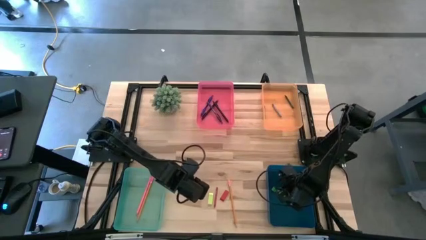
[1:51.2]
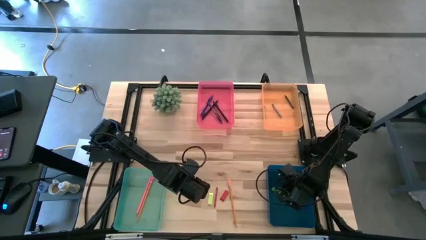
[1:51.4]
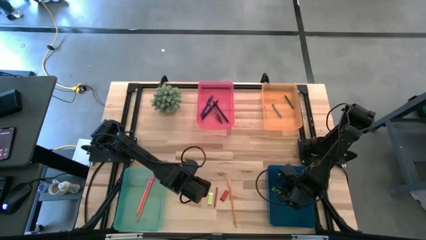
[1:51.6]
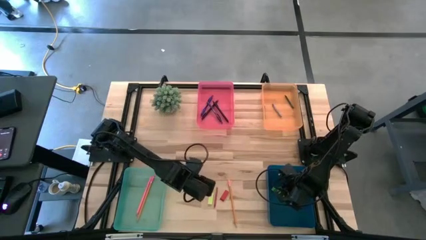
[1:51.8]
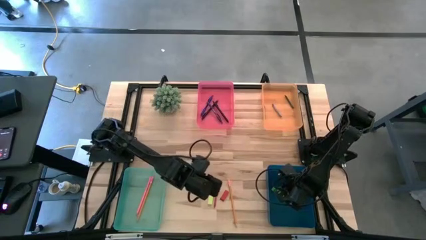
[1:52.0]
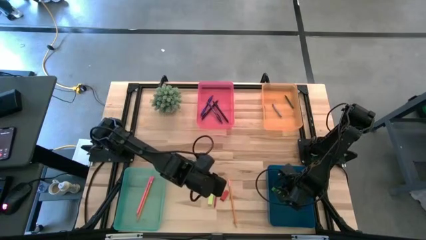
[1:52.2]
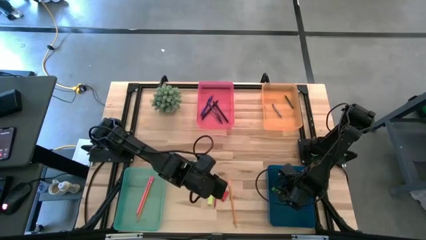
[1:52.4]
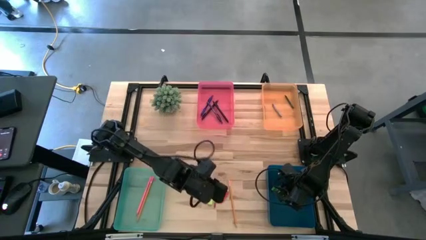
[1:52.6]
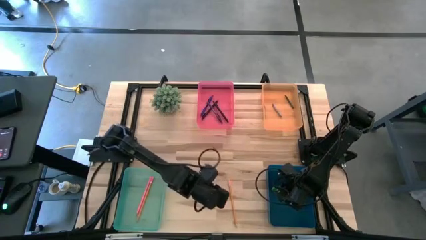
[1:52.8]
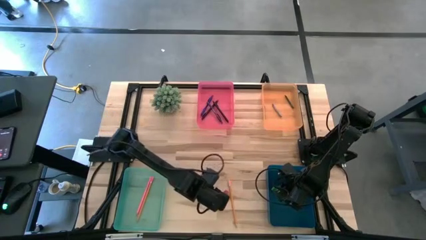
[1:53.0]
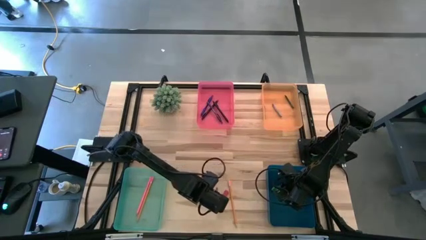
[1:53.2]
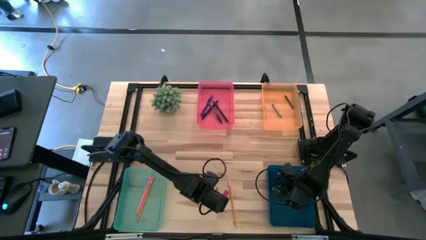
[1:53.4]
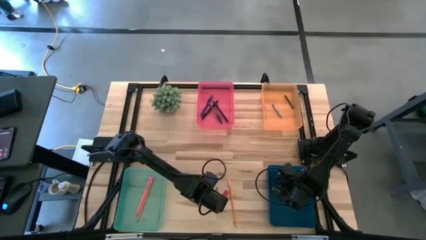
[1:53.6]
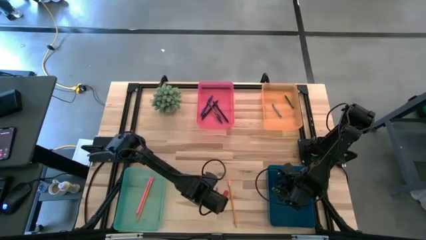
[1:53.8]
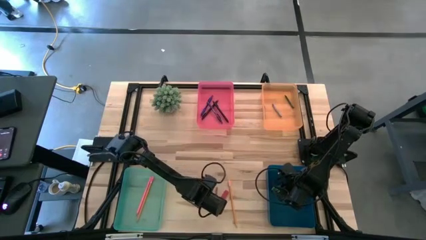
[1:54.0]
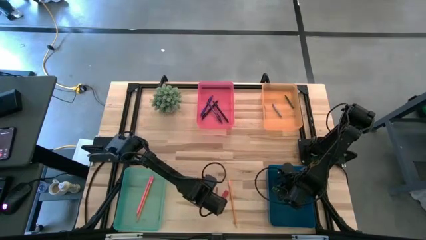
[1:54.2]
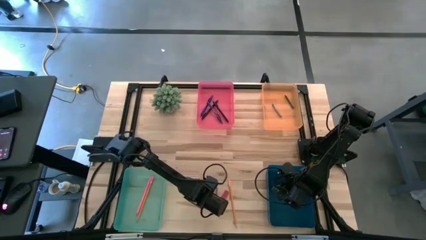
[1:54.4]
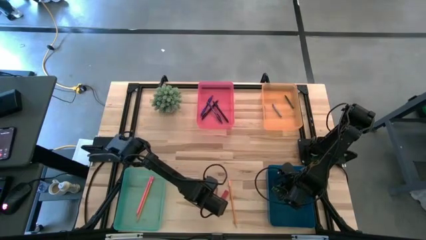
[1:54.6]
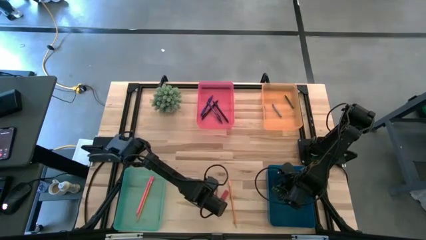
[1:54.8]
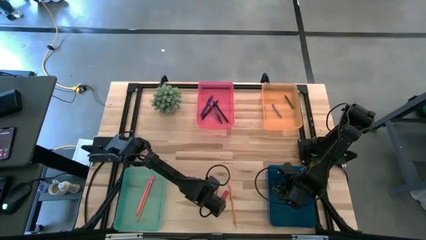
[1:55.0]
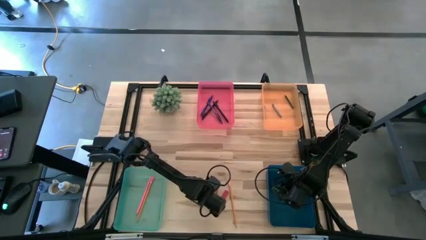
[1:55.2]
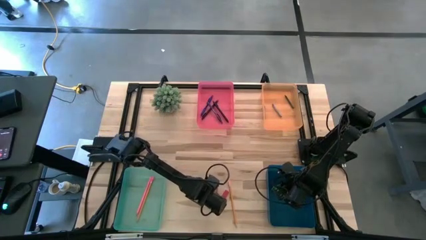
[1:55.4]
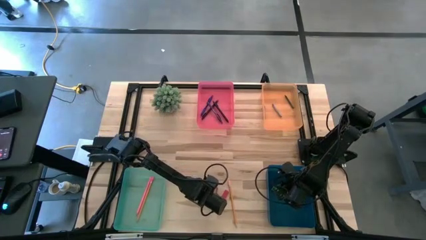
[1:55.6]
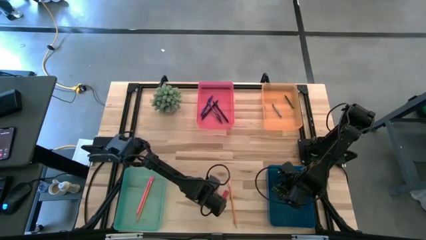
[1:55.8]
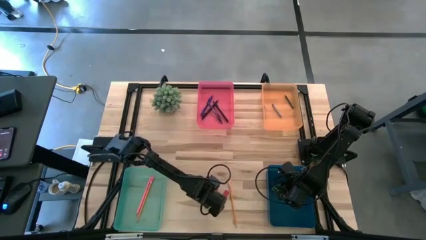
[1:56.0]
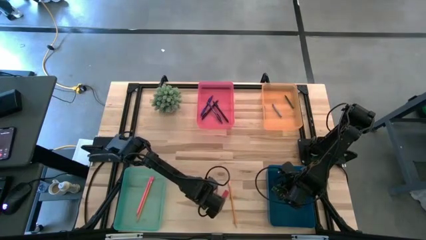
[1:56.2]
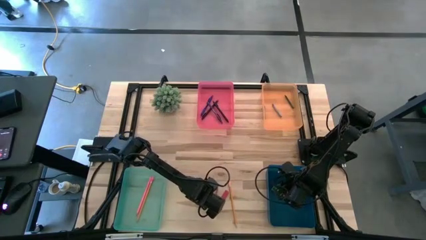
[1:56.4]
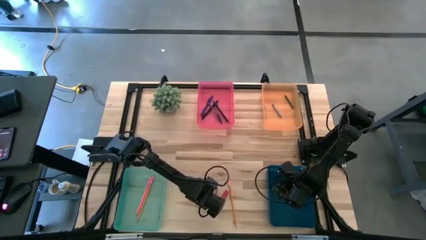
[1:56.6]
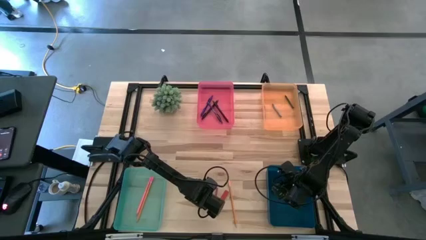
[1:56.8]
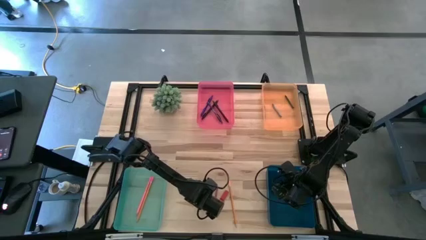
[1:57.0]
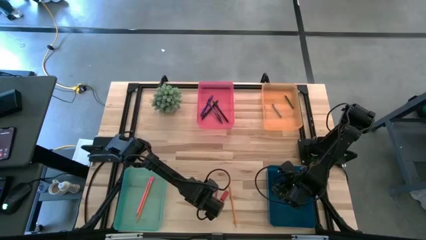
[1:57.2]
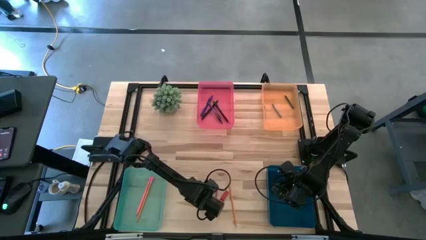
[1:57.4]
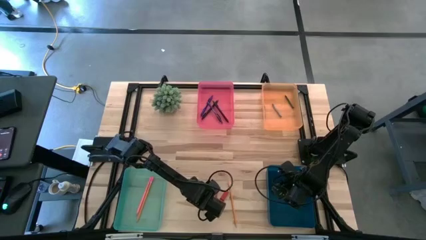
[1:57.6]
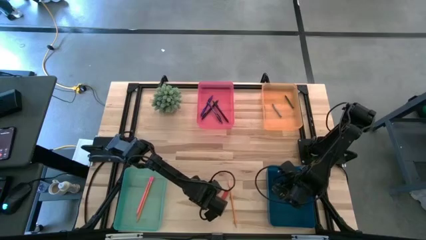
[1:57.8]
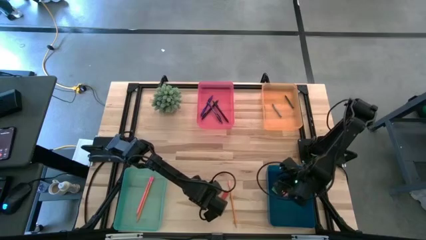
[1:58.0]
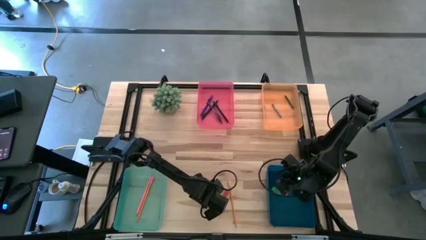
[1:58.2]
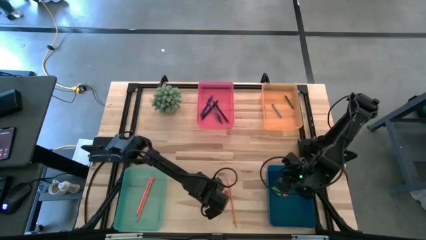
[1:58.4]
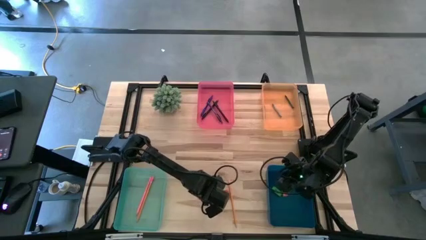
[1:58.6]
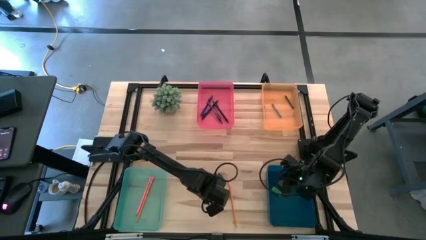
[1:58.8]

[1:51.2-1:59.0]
Task: Sort crayons/erasers/pens/pencils in bins
Put the light green eraser into the blue bin

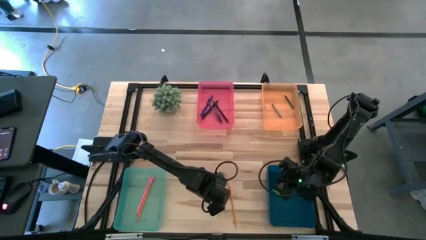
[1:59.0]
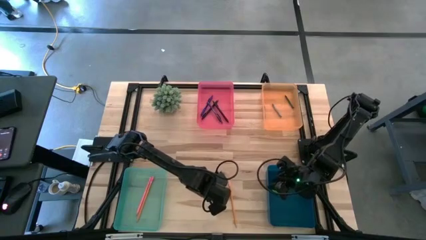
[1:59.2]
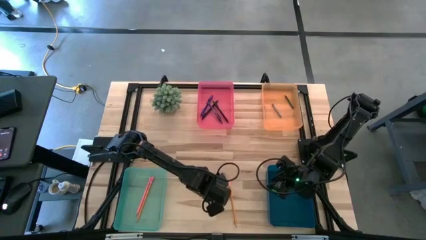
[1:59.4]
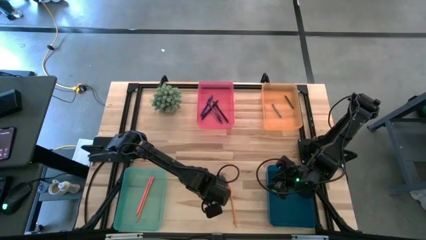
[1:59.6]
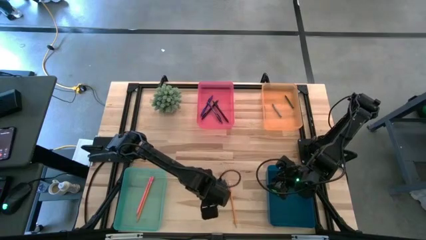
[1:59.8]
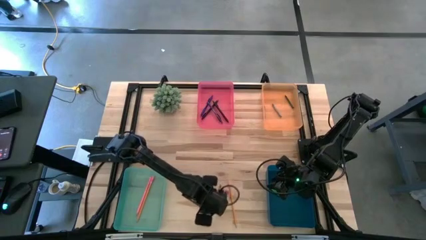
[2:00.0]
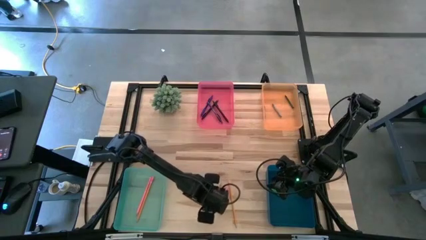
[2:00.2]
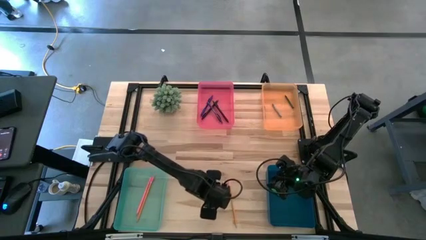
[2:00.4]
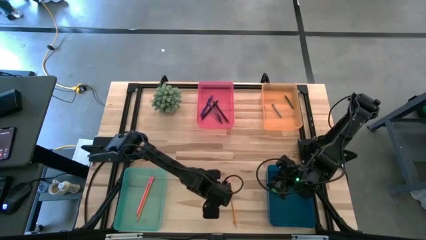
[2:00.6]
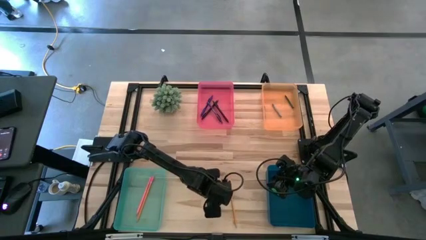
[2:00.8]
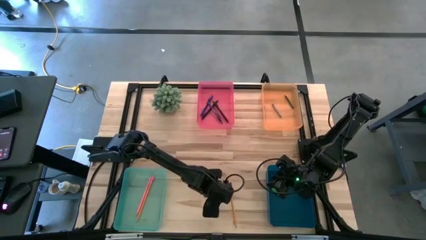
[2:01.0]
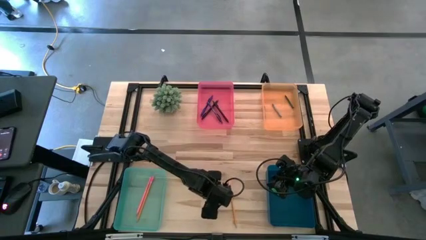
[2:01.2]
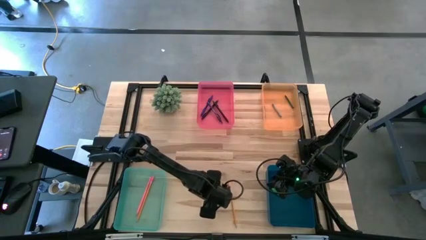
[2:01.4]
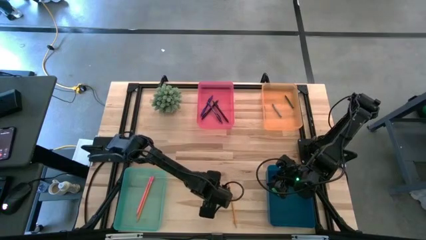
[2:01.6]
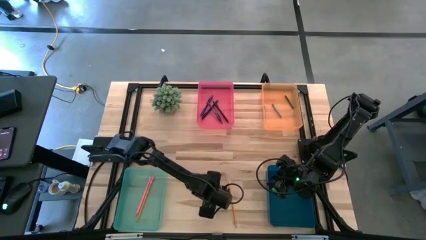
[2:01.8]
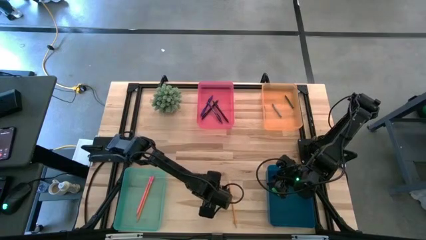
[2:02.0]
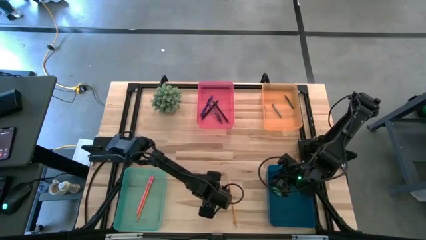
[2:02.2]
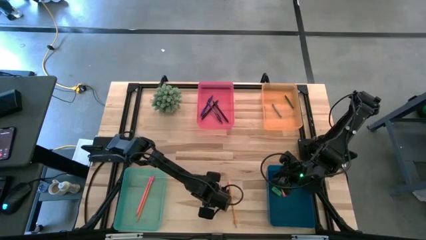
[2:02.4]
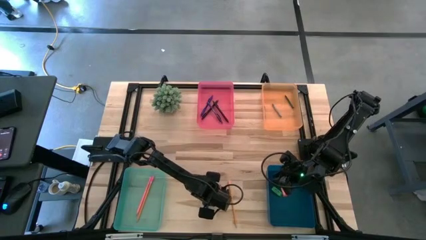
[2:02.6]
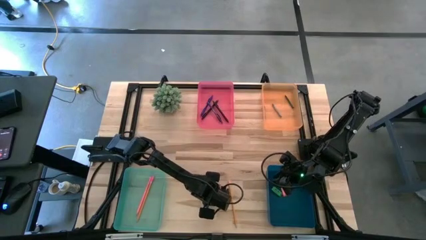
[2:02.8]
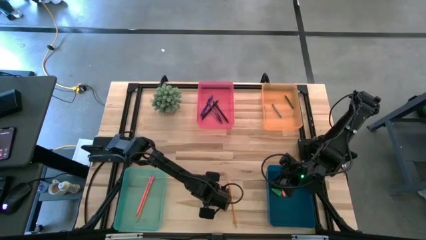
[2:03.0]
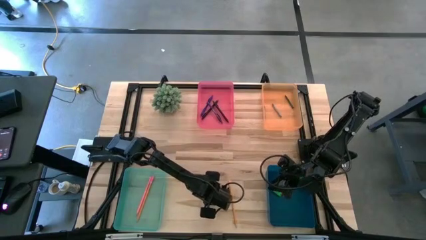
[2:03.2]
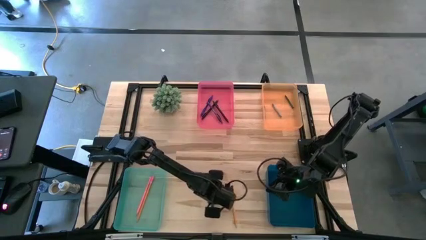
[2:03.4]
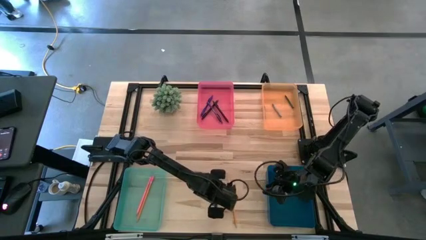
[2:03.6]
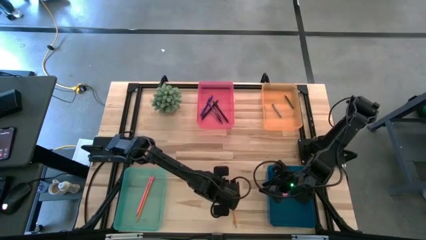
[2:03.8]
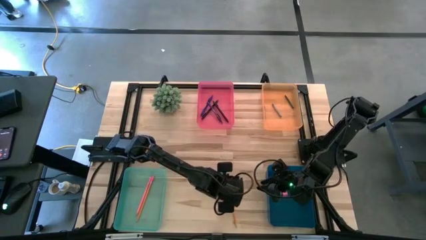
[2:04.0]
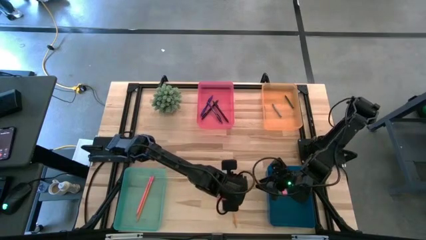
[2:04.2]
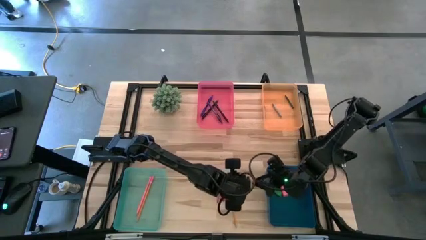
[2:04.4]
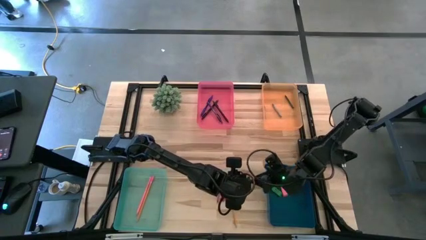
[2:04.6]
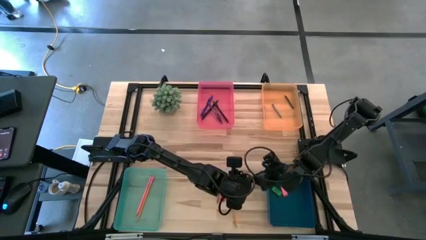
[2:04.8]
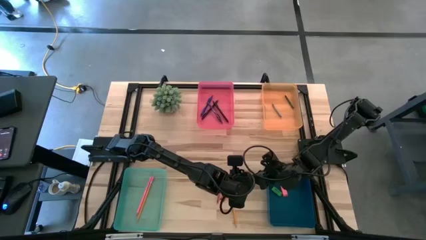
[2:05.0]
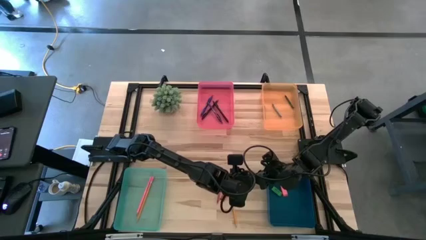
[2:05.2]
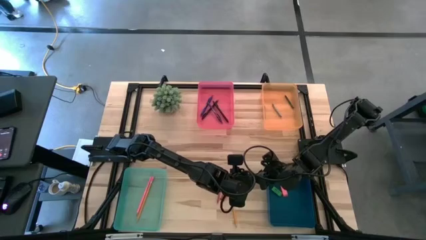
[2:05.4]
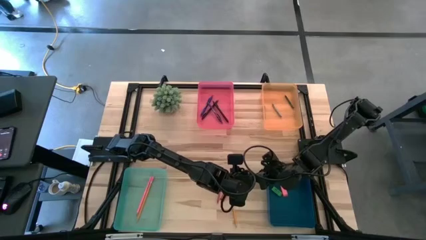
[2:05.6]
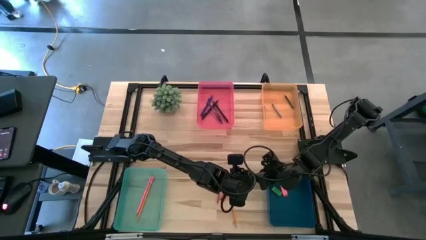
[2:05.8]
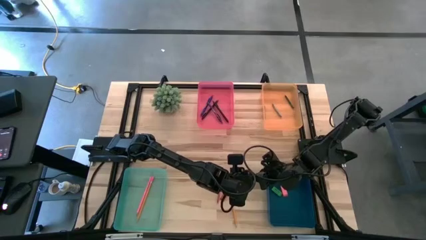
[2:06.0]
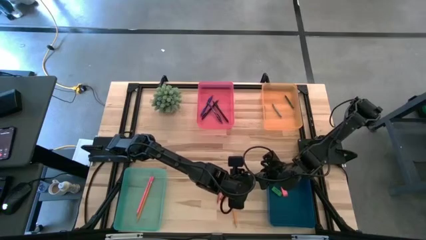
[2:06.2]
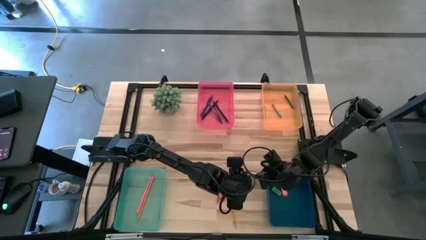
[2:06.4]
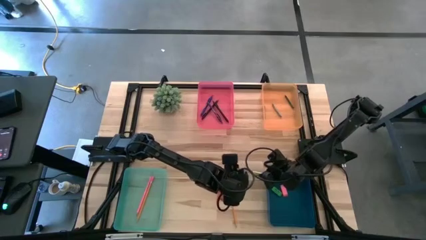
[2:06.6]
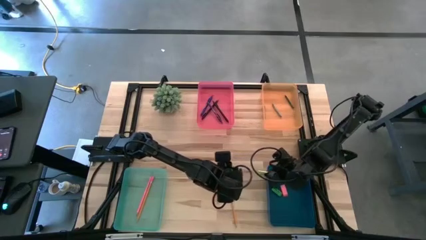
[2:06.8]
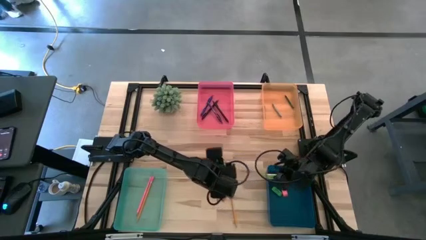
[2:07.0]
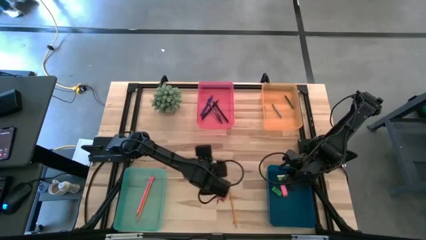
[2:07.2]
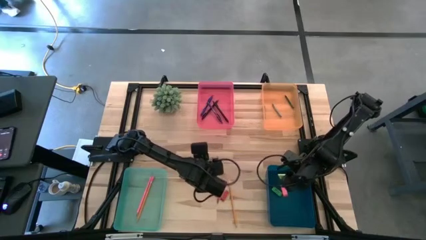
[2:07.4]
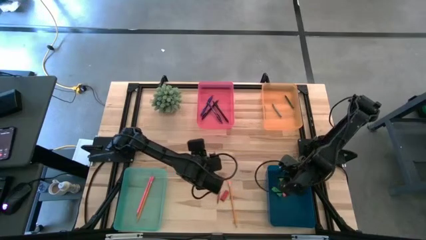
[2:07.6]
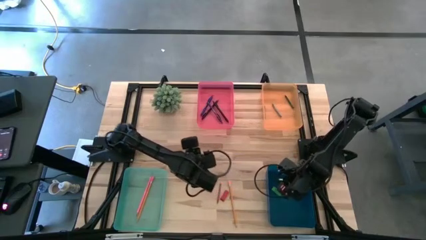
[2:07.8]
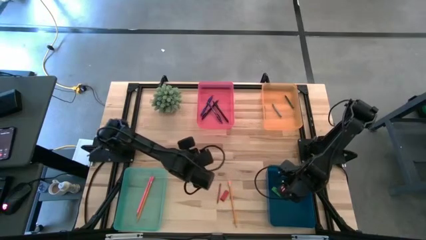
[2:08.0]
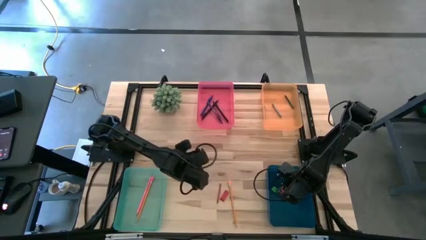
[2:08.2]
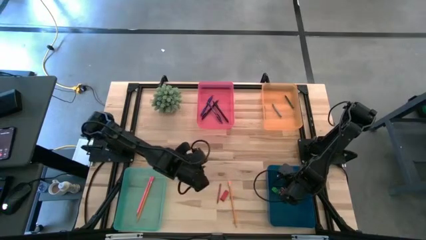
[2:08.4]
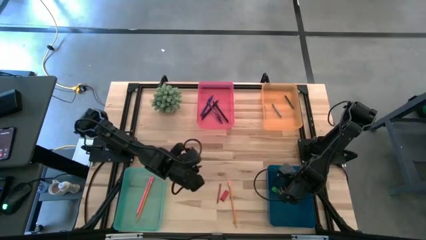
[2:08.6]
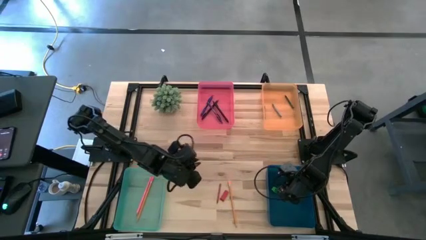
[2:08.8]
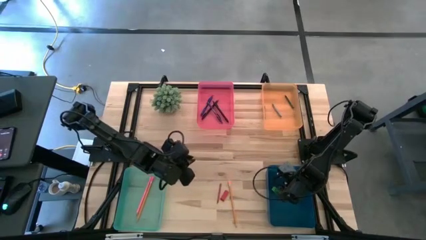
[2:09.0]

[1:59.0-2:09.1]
Put the light green eraser into the blue bin
